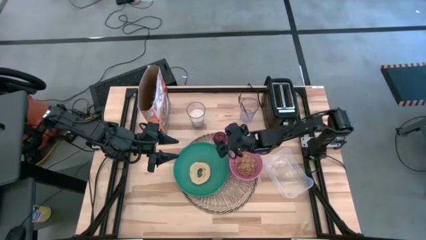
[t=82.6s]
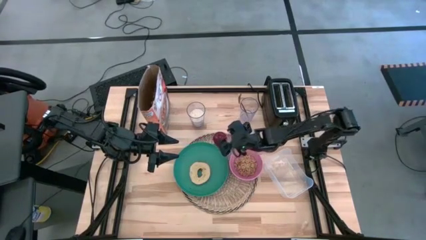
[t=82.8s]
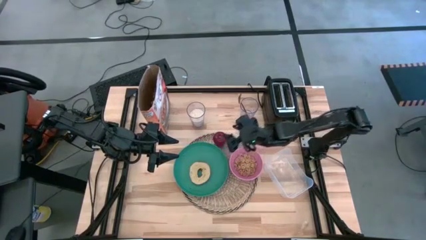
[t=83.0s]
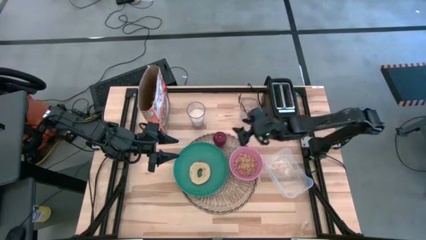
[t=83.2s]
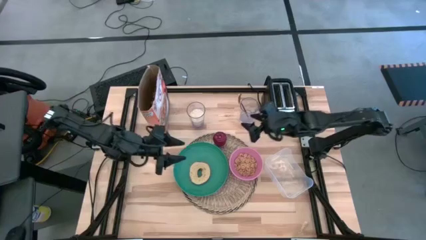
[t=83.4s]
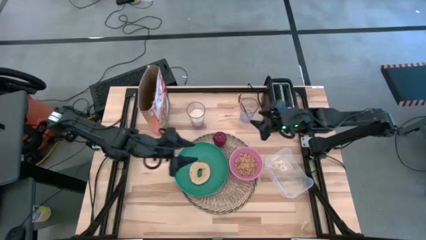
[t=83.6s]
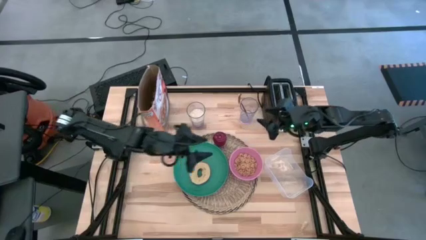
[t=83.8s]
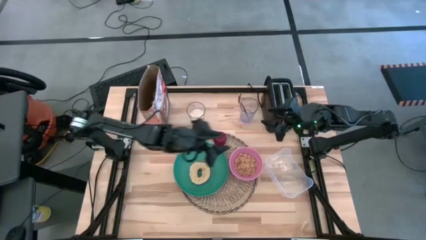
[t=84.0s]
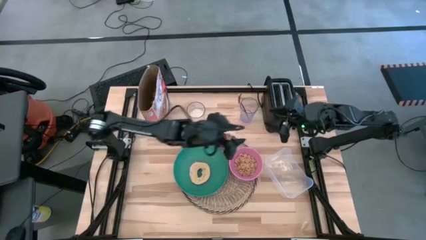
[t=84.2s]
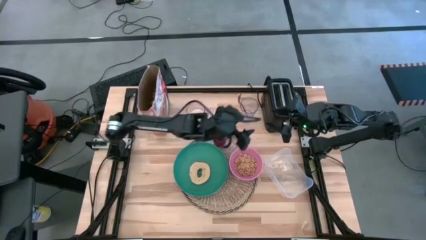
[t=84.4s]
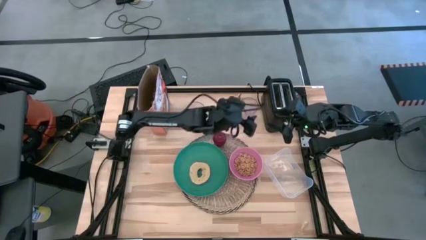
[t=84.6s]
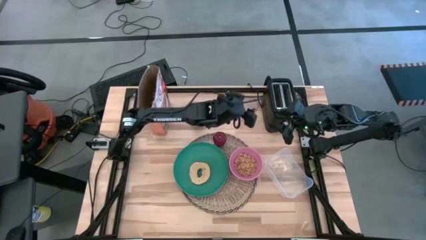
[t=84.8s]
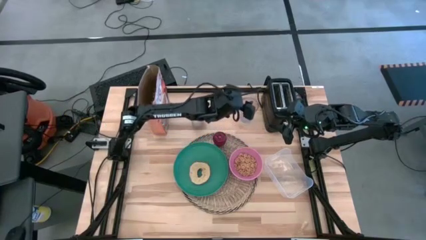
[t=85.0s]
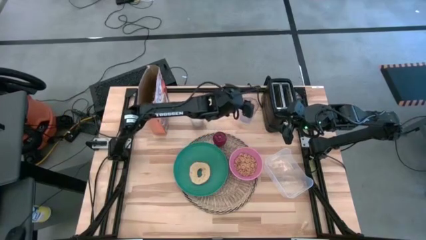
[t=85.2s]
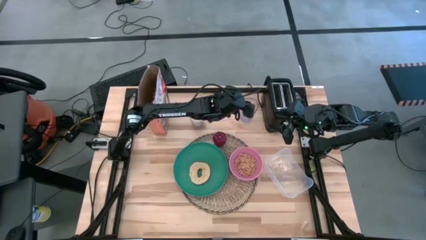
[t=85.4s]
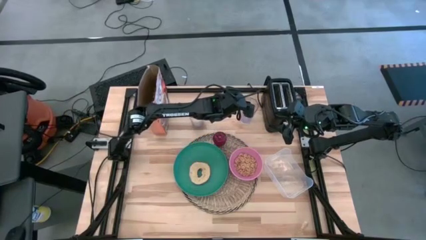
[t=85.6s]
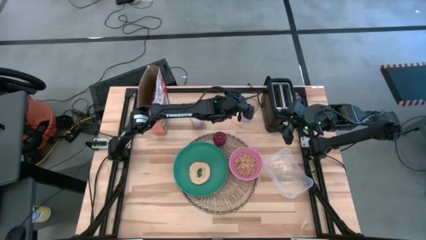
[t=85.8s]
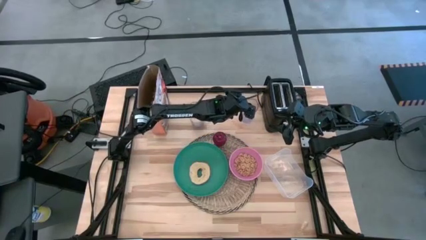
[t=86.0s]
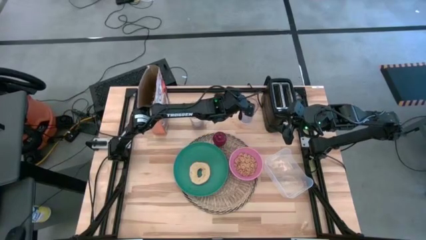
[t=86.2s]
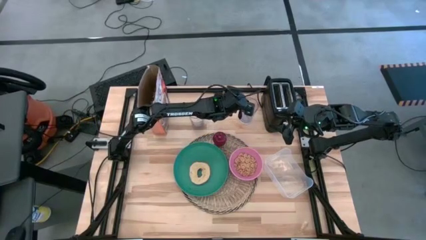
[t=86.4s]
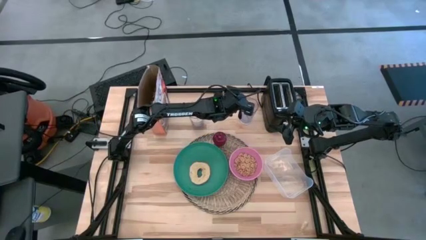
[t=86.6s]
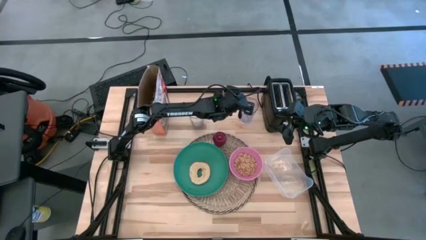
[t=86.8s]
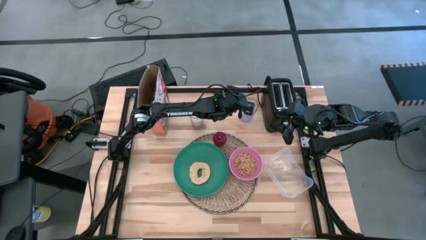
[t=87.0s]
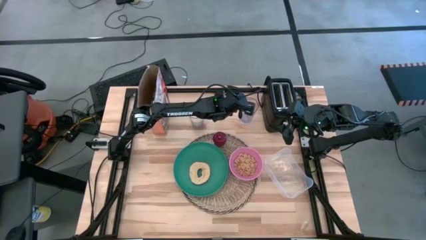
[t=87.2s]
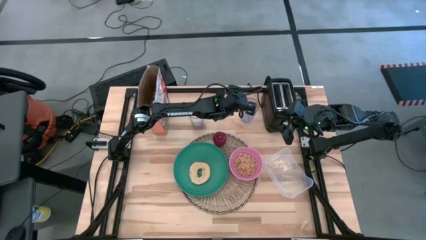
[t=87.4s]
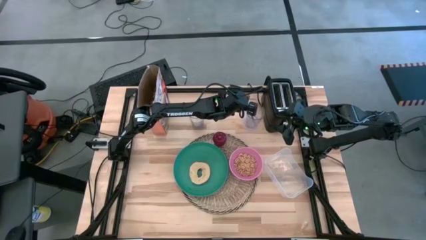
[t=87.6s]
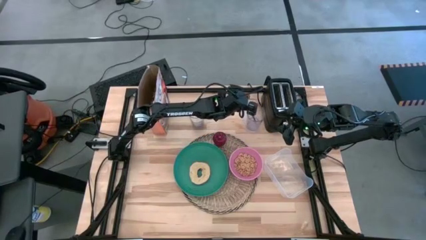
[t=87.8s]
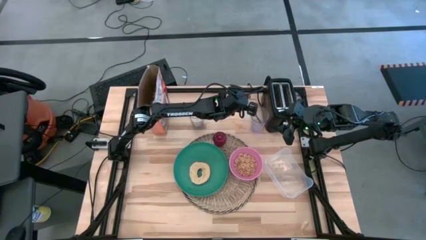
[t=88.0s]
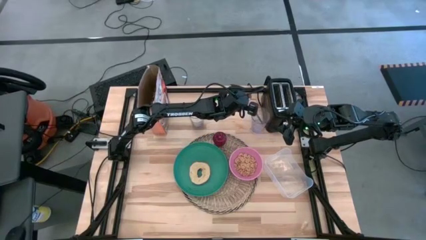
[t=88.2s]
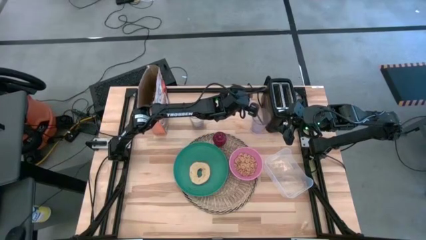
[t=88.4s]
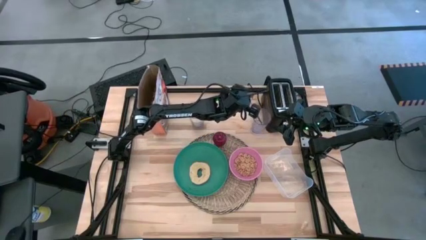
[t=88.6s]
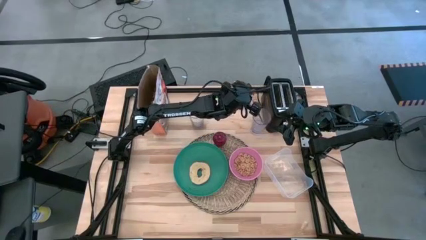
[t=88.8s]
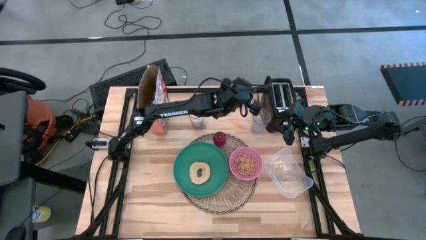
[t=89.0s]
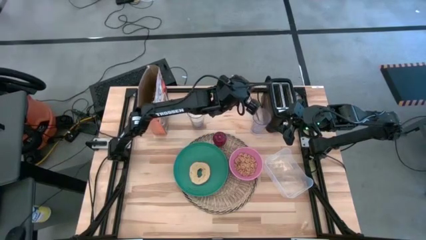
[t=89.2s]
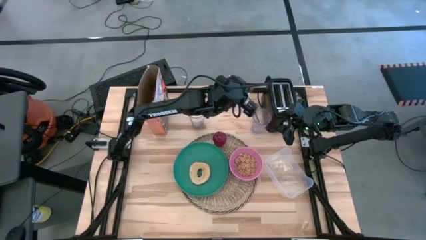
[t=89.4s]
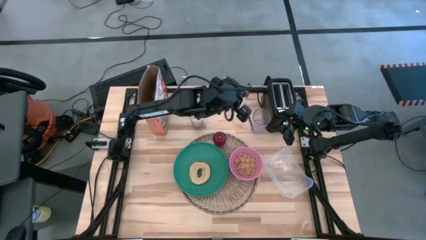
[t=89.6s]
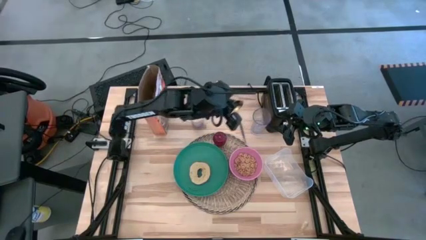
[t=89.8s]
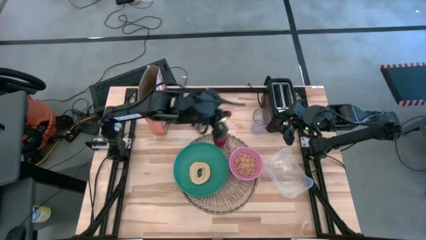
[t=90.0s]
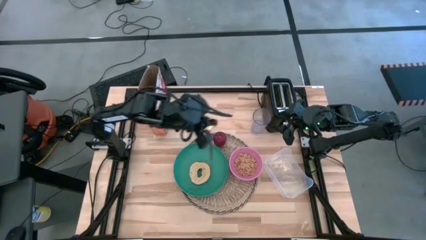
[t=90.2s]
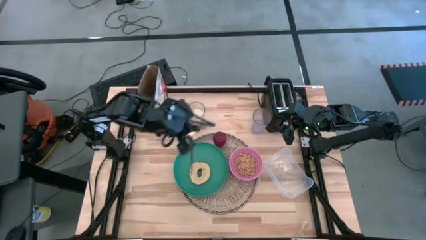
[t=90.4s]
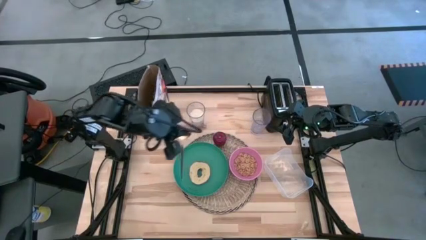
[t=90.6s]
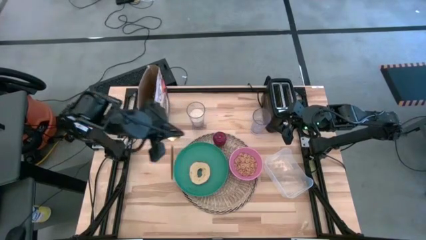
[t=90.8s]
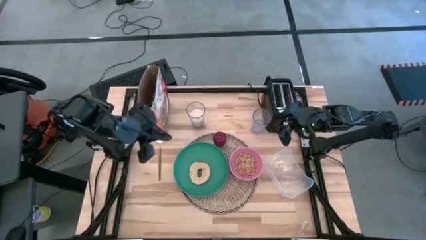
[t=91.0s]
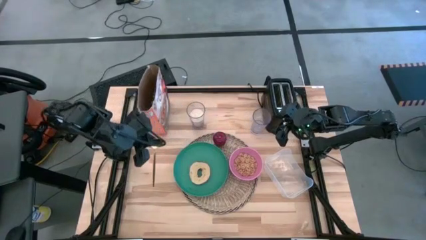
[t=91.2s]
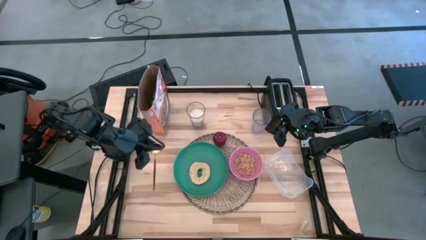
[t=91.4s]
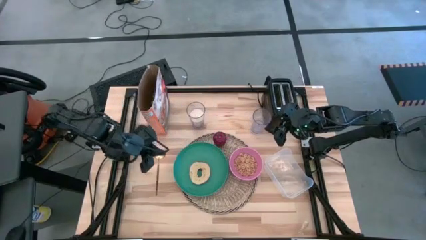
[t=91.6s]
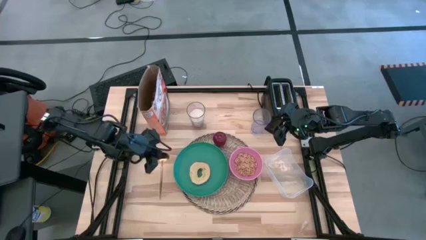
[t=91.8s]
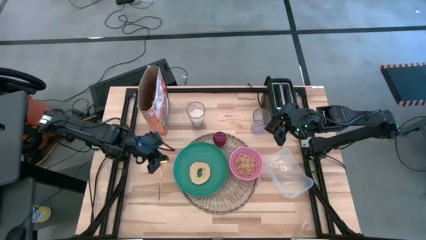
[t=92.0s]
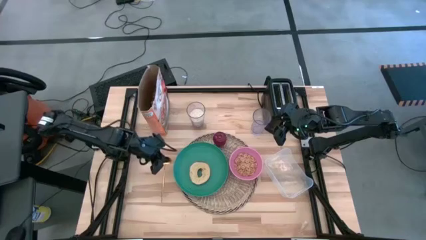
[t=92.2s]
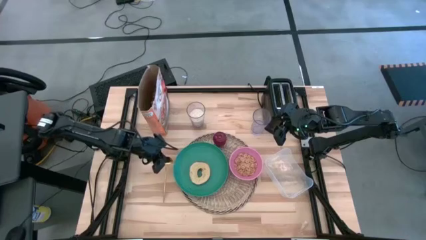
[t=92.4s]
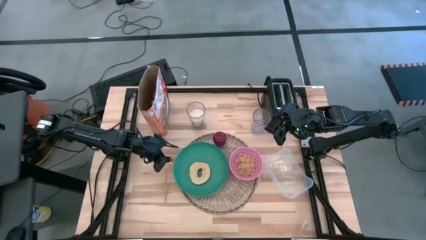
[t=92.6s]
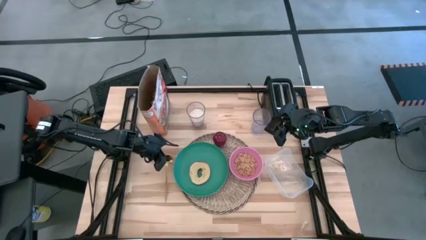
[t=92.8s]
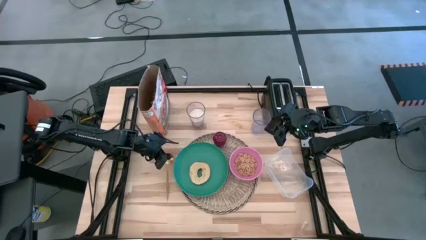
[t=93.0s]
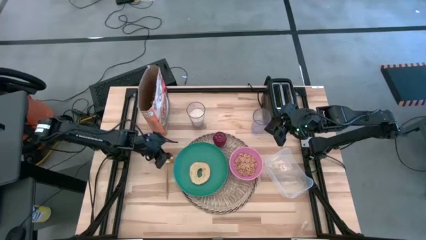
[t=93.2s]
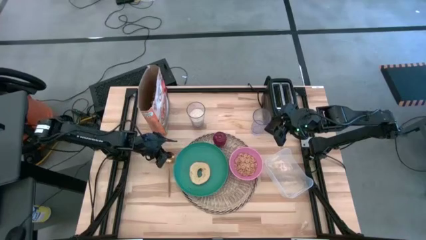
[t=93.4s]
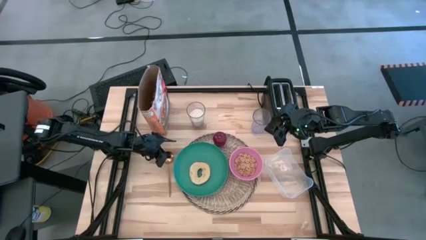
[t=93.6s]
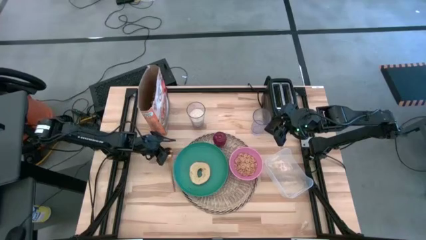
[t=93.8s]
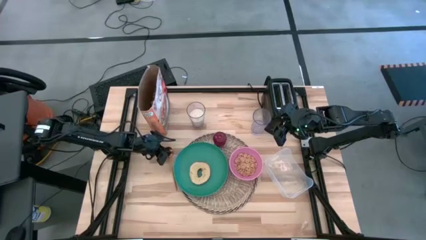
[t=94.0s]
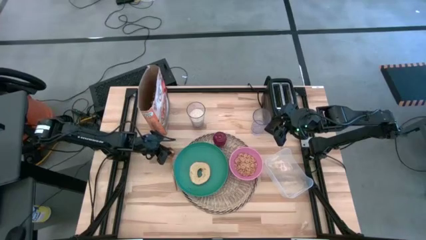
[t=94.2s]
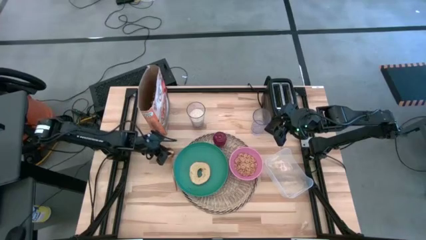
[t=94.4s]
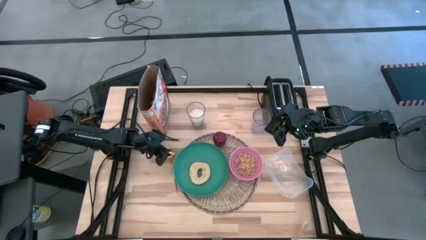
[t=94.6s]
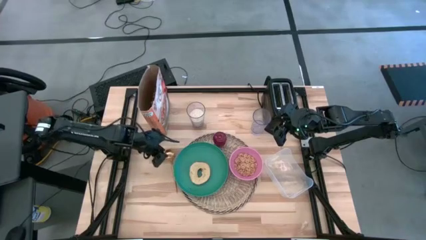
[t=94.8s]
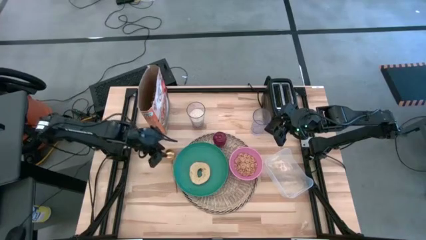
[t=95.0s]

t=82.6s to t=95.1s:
Task: Arrange a breakfast setting
Put the spoon on the left side of the green plate

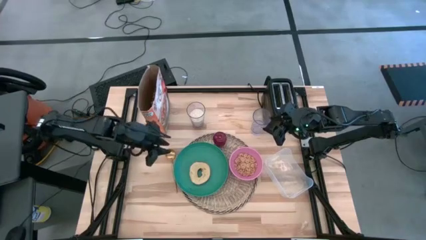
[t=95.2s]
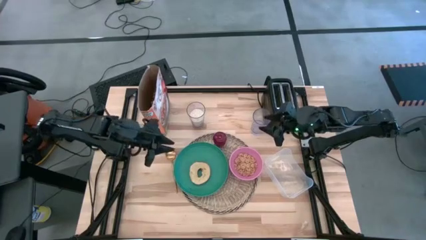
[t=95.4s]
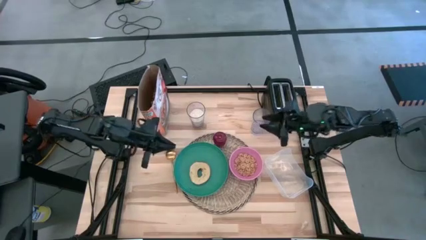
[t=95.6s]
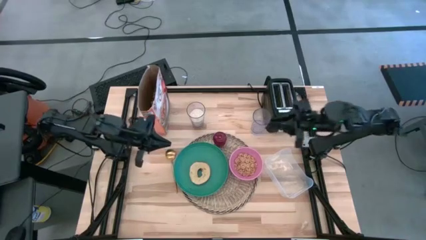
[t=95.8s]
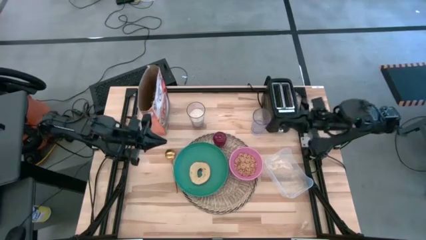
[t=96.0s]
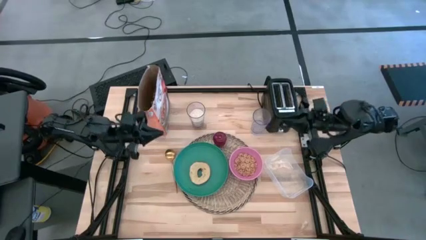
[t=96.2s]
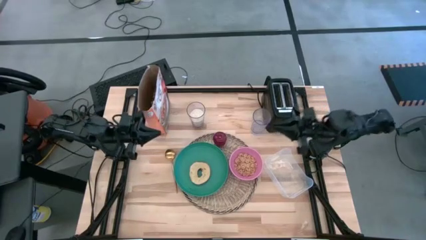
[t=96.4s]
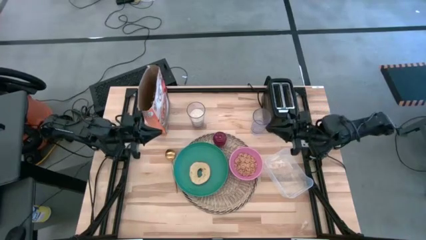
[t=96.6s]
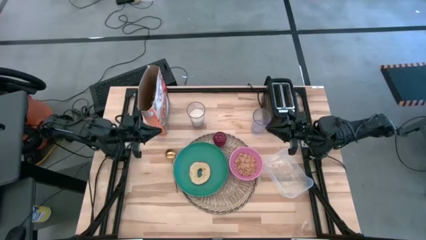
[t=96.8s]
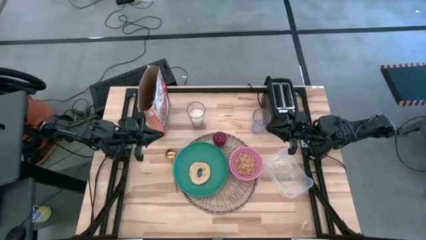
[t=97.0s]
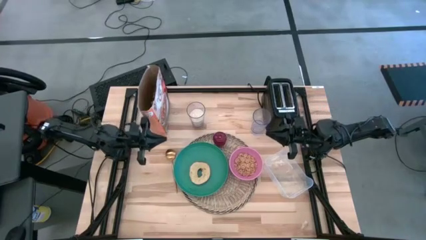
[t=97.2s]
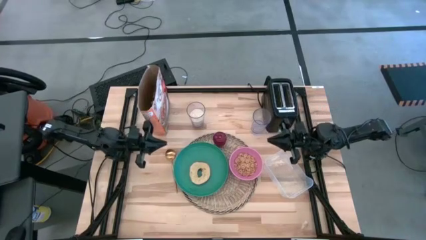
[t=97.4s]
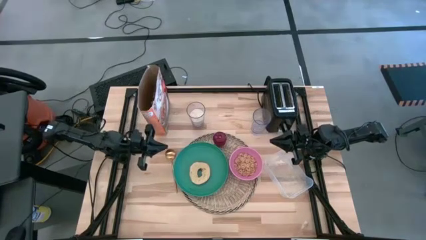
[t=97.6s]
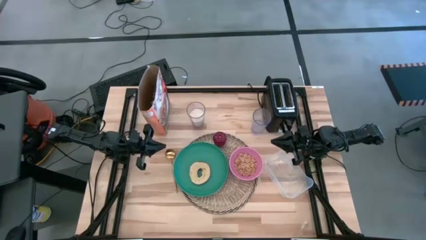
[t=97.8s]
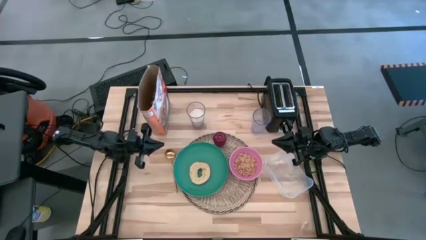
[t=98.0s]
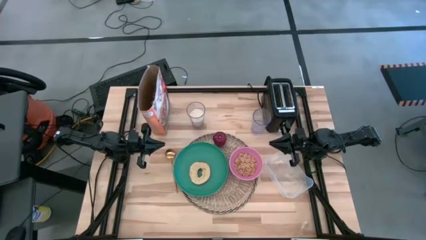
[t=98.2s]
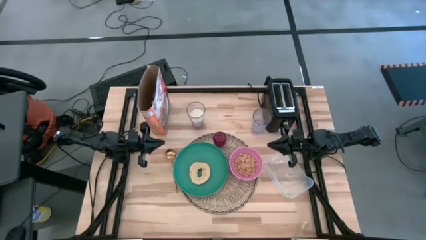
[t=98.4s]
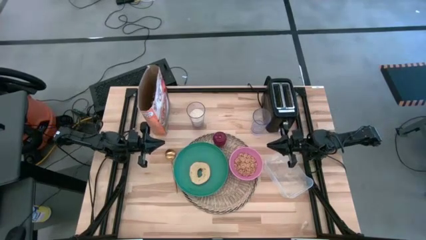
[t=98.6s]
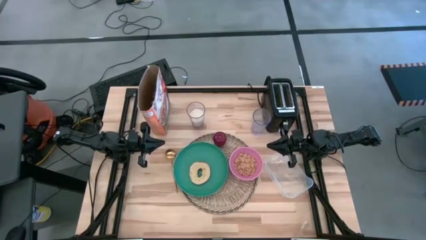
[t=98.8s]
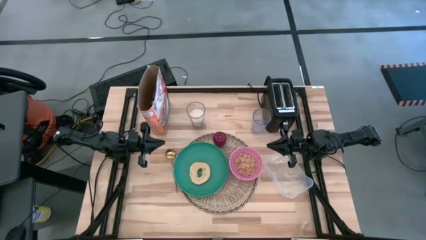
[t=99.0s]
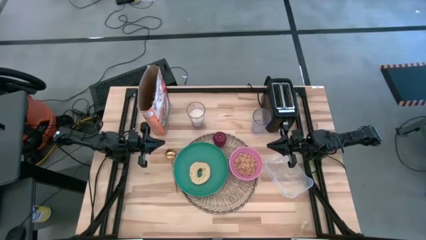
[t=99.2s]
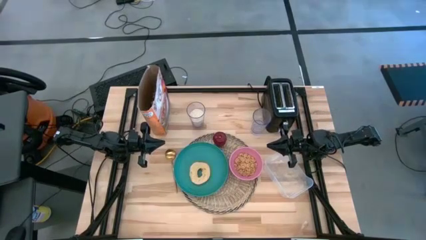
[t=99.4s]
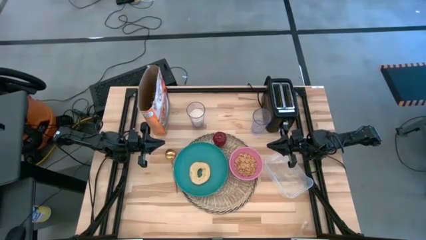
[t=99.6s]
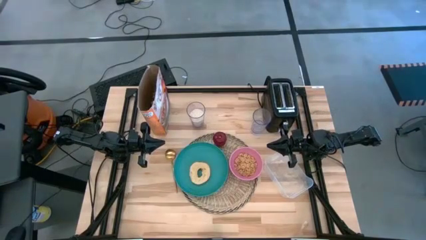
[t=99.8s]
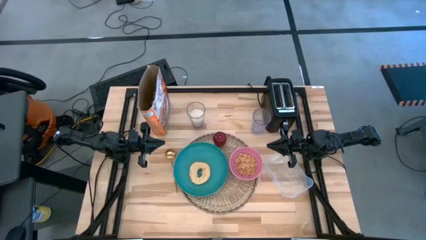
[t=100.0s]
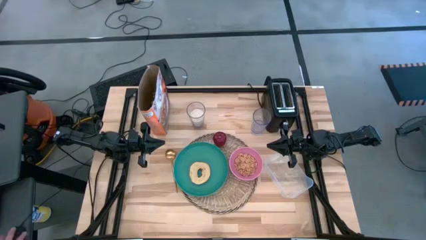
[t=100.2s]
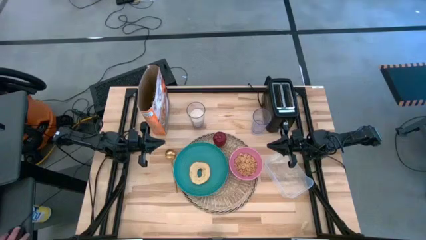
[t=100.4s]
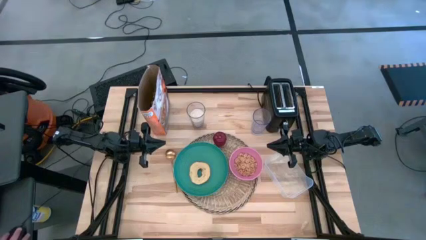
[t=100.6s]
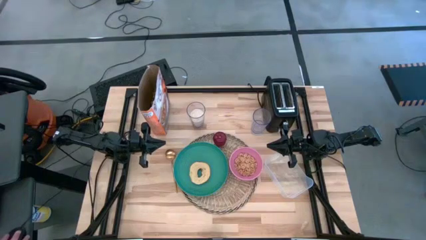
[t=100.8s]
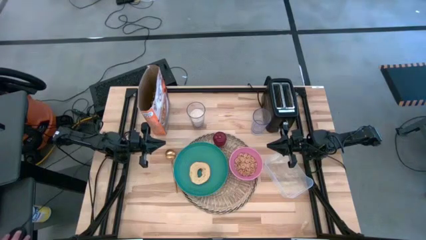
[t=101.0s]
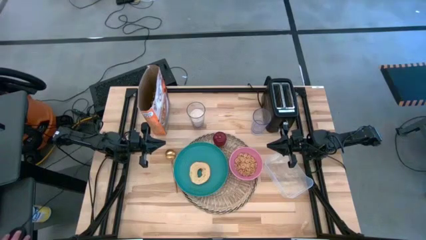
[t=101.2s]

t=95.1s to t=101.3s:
Return to Home Position
